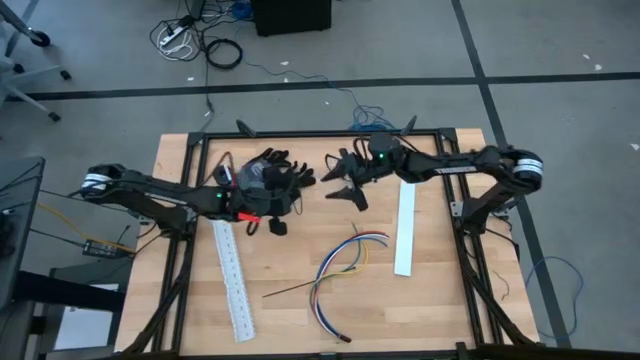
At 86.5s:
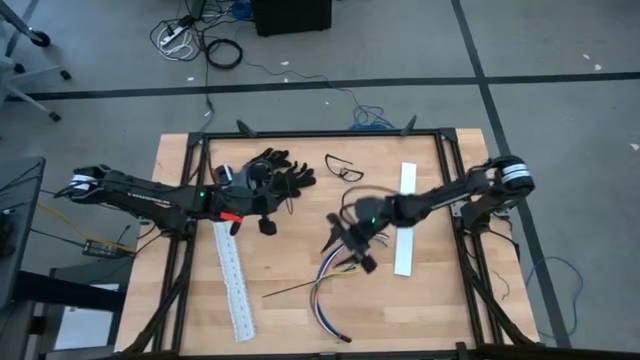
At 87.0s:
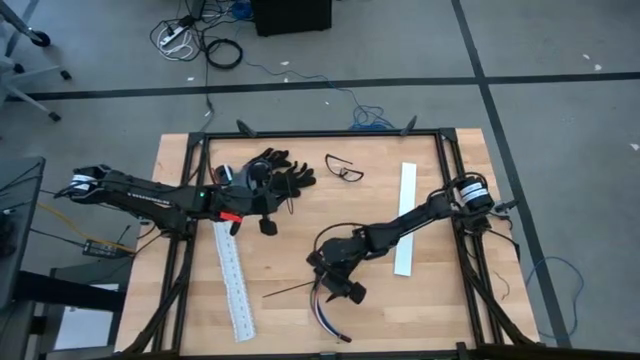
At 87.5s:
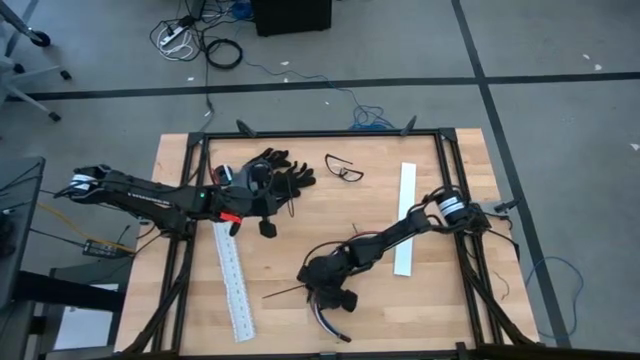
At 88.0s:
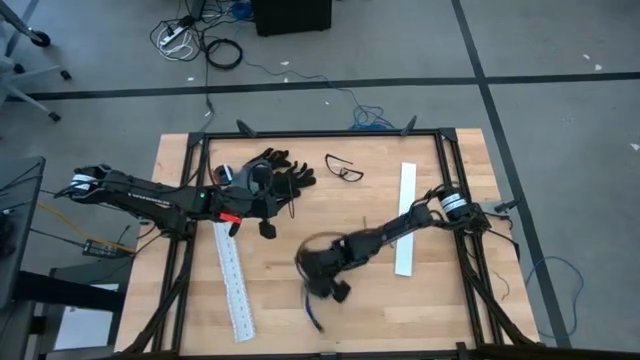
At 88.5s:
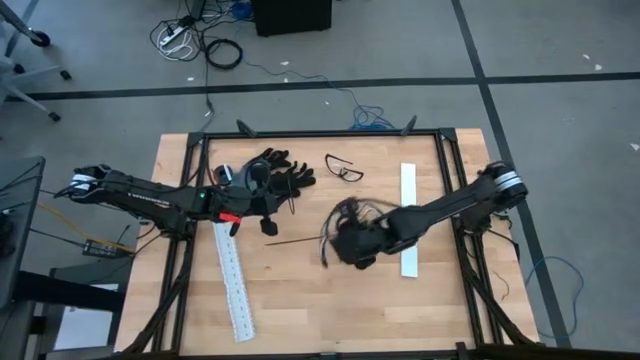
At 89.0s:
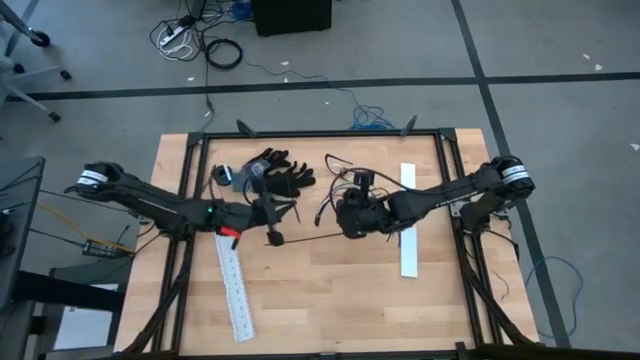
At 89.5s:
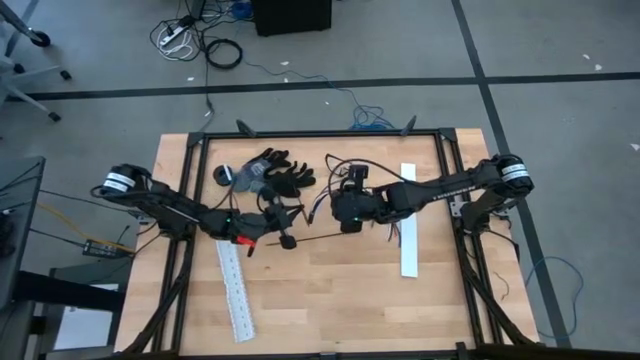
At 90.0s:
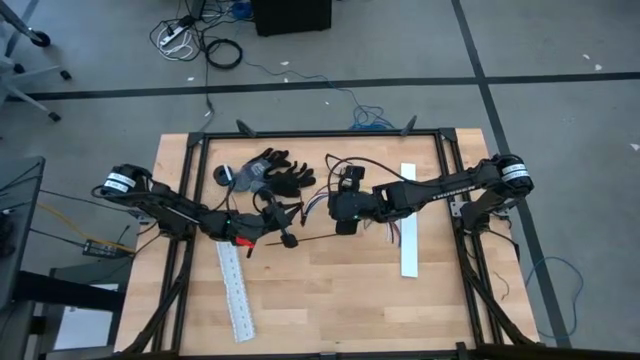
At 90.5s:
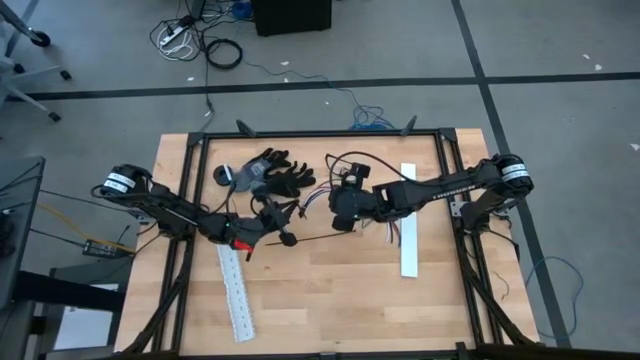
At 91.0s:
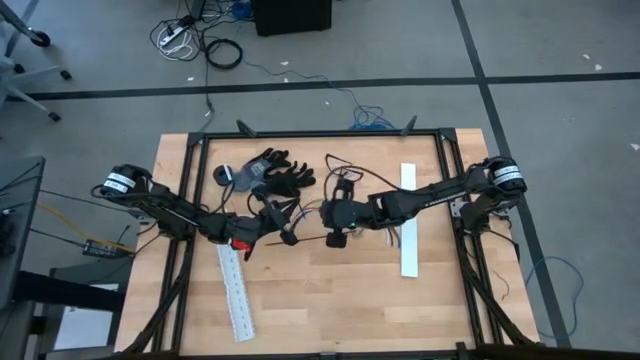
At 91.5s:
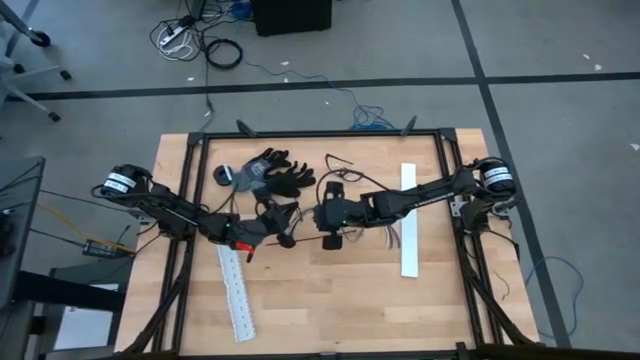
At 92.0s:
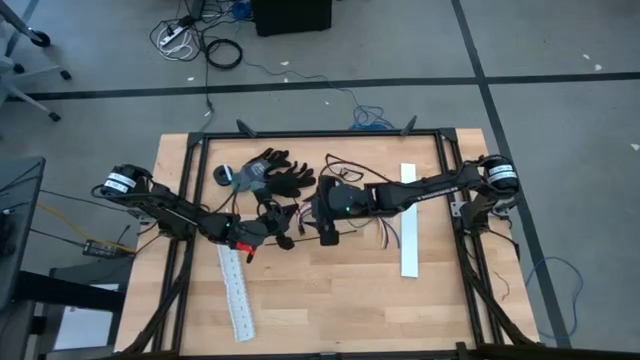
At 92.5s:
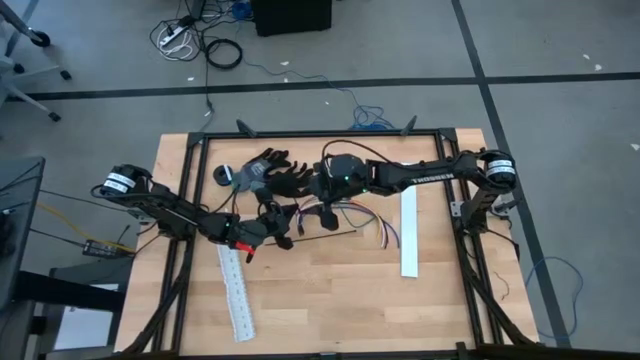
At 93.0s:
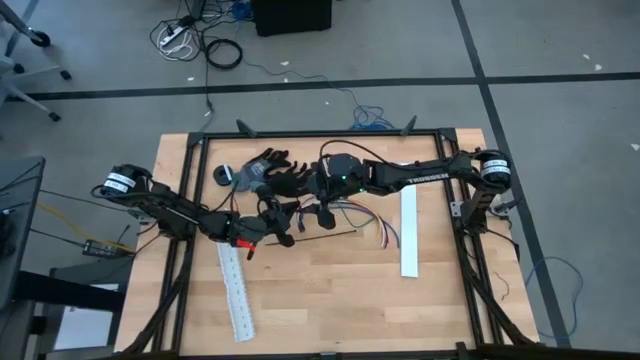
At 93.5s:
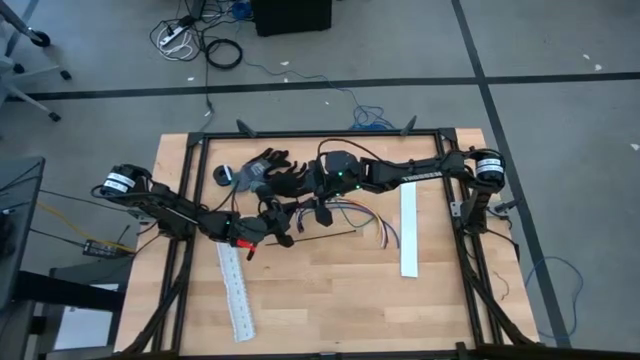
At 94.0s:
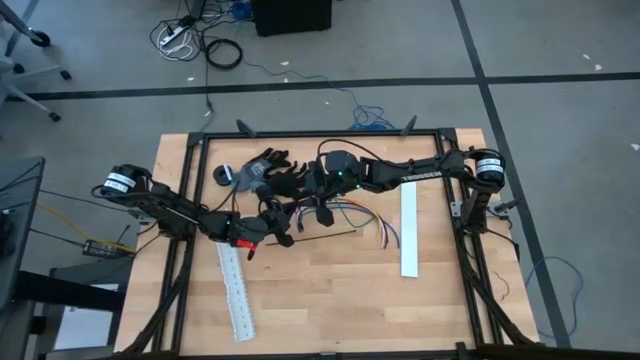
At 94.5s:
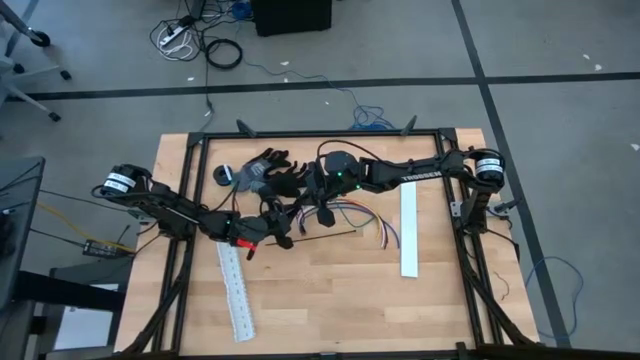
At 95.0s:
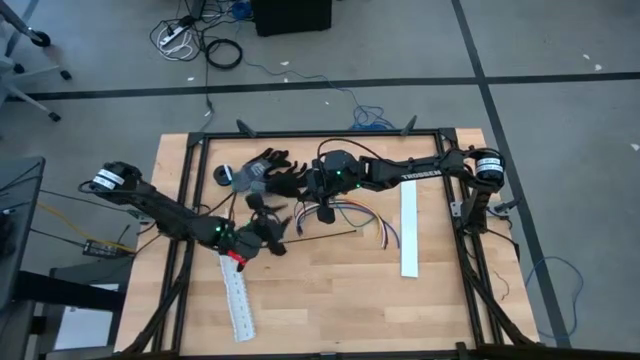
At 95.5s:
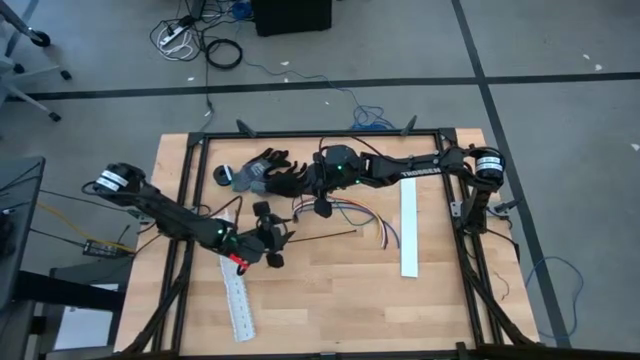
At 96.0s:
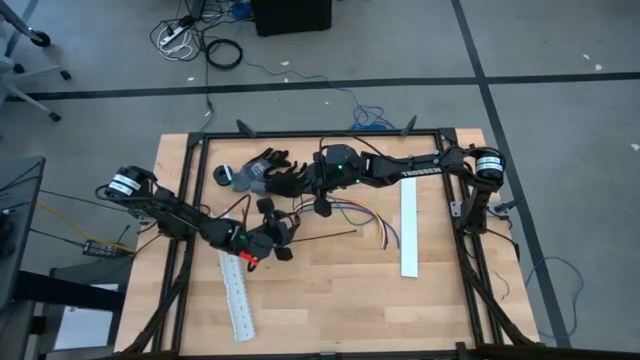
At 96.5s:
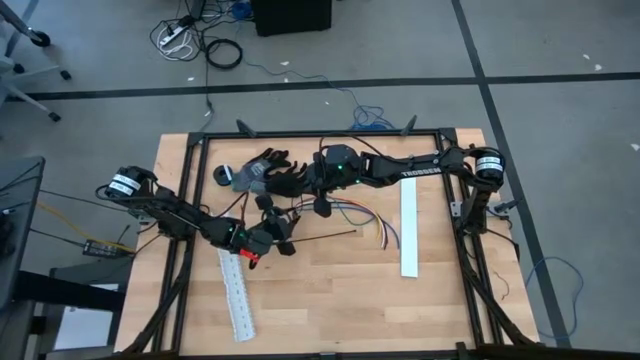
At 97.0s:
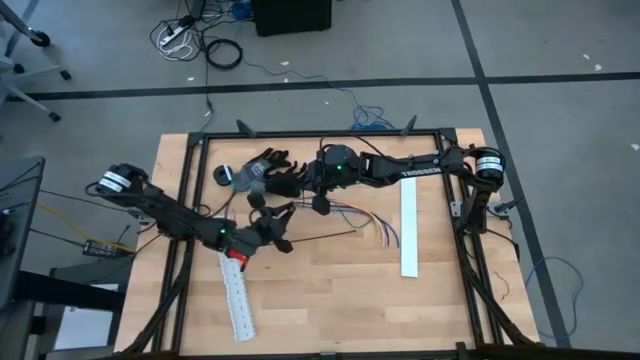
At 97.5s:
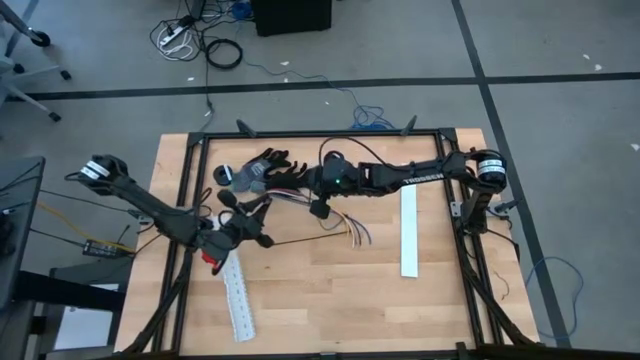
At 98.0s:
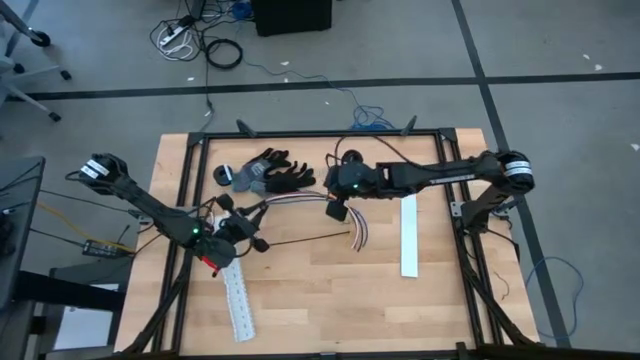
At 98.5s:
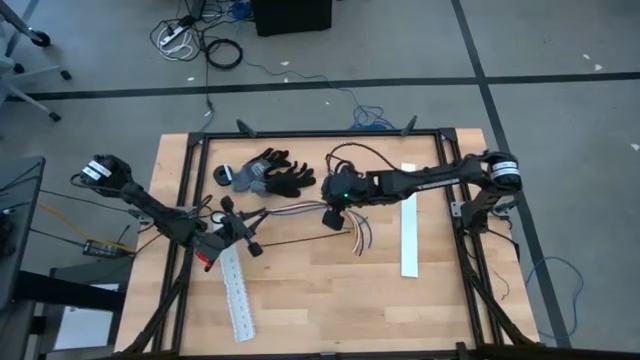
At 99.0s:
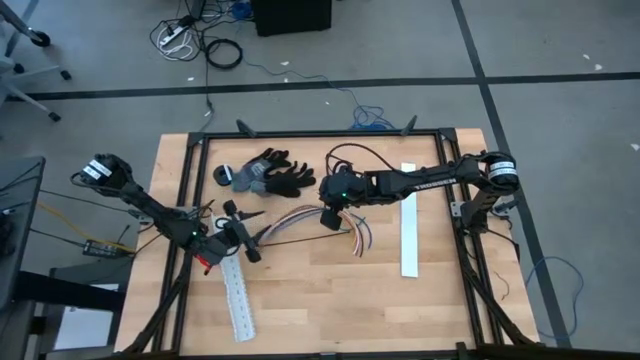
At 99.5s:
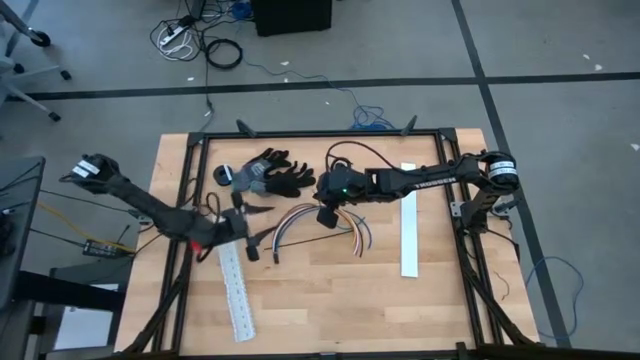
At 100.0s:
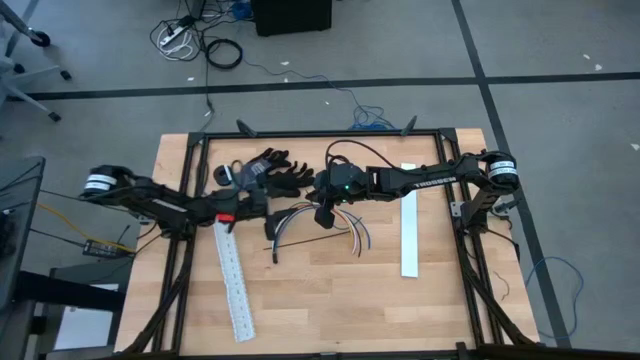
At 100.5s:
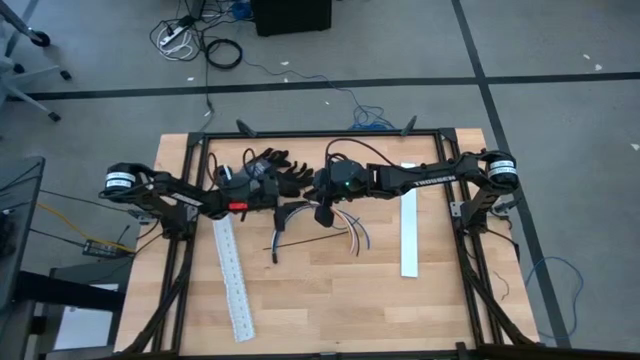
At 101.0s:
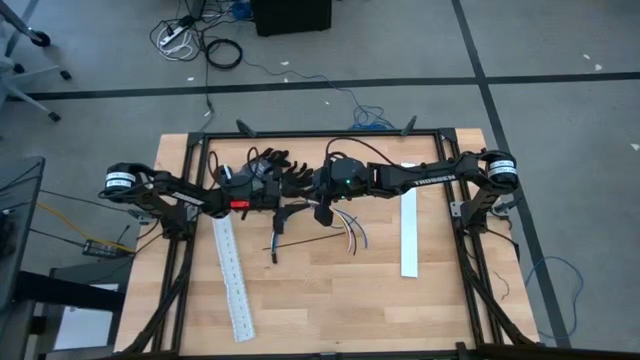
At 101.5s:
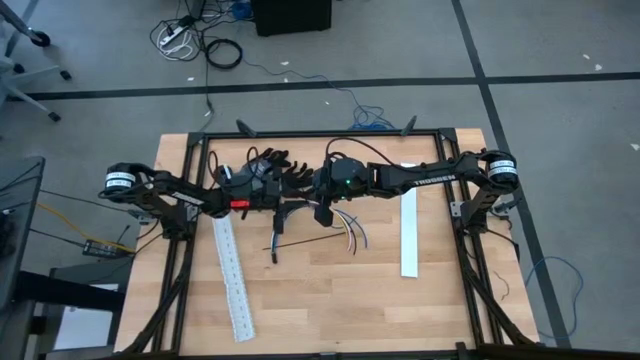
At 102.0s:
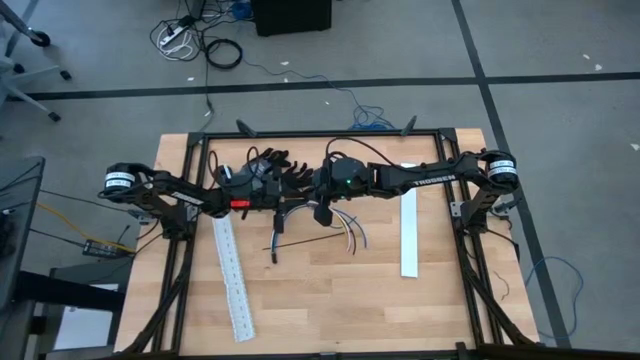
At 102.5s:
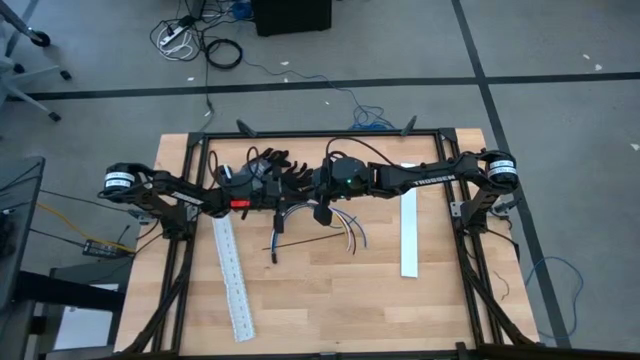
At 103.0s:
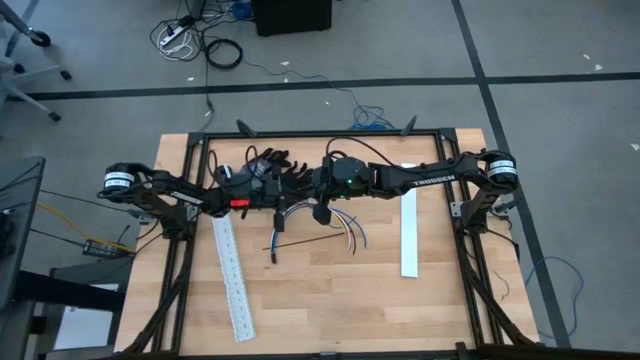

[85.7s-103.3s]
Task: Ziptie cables
Wrap the cables together using the black zip
